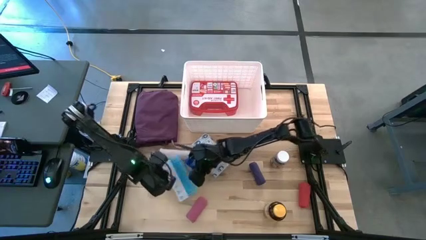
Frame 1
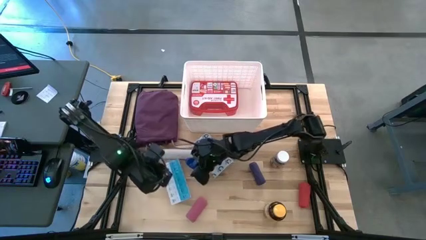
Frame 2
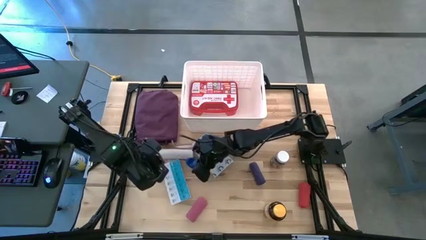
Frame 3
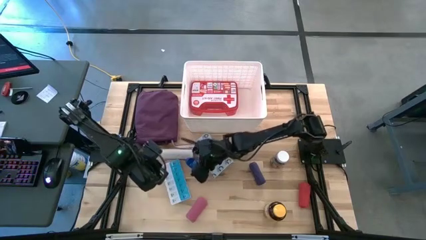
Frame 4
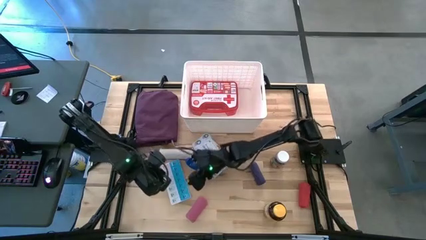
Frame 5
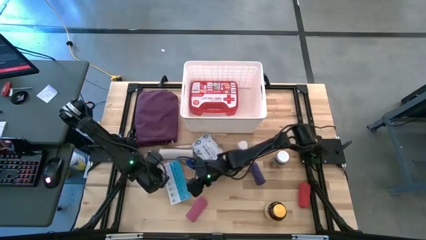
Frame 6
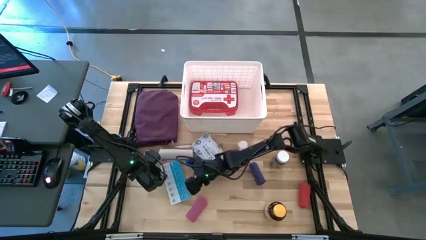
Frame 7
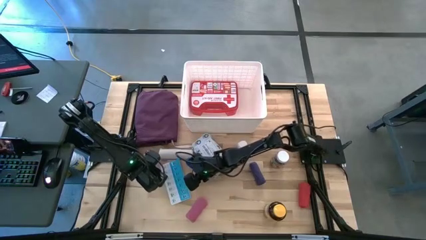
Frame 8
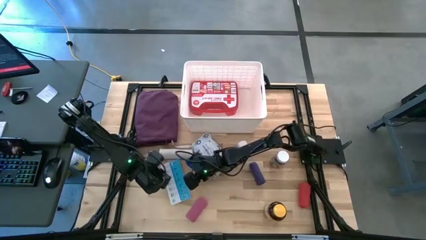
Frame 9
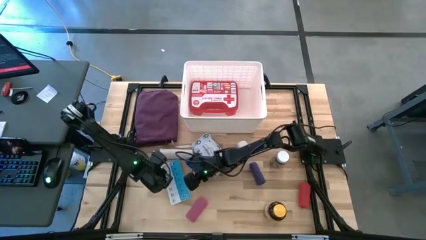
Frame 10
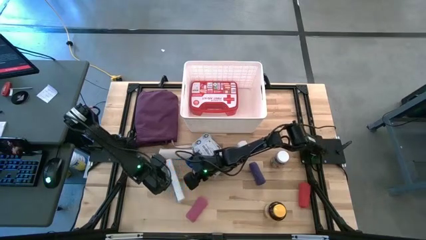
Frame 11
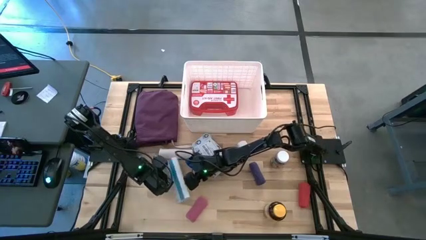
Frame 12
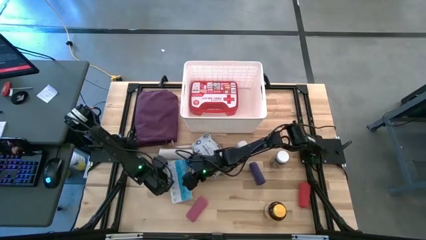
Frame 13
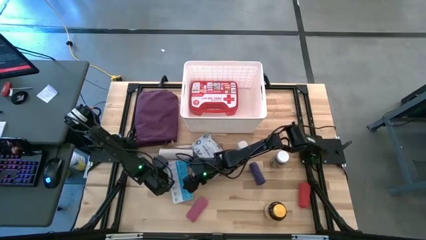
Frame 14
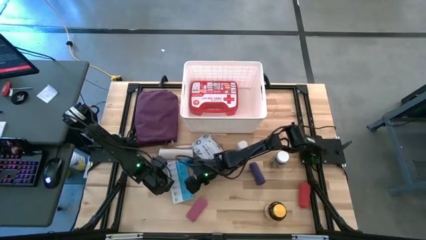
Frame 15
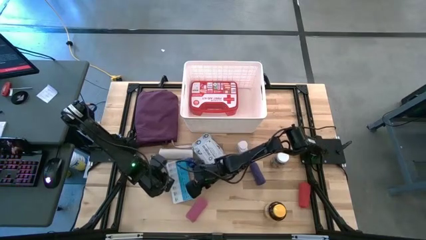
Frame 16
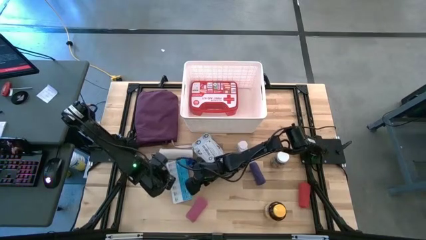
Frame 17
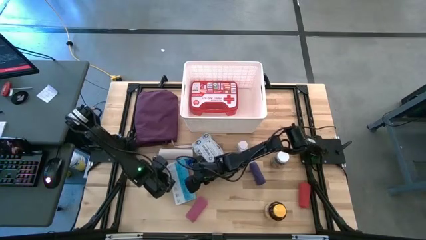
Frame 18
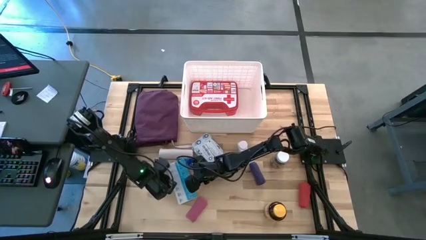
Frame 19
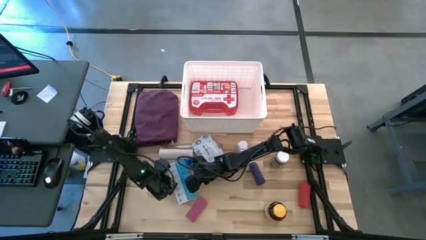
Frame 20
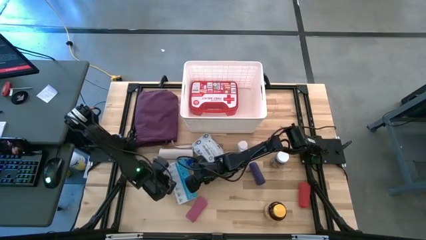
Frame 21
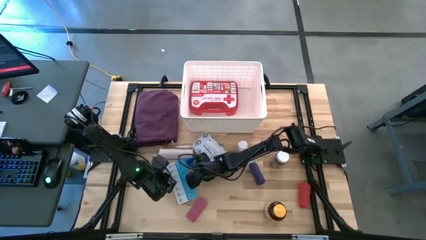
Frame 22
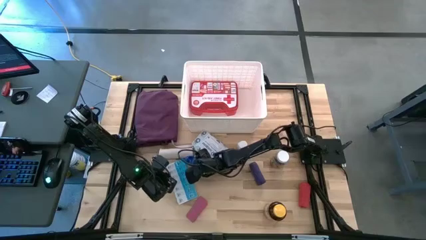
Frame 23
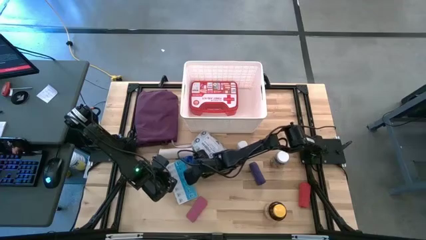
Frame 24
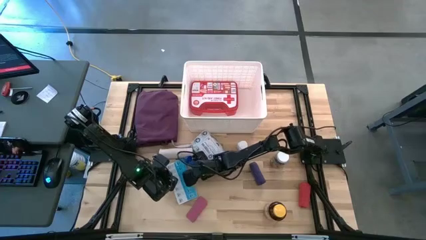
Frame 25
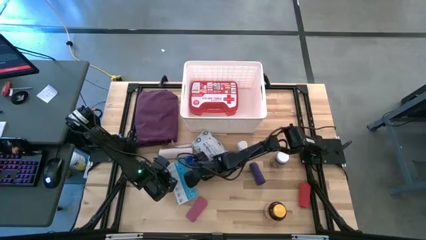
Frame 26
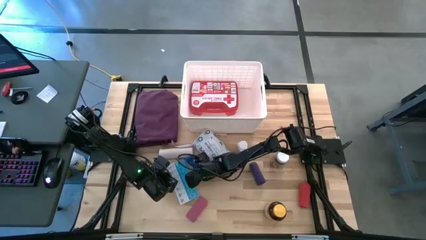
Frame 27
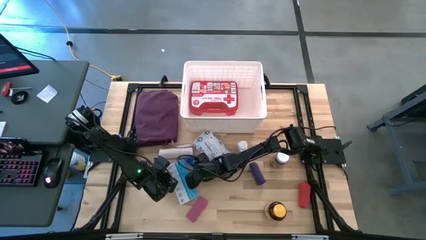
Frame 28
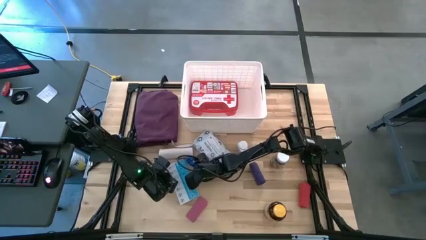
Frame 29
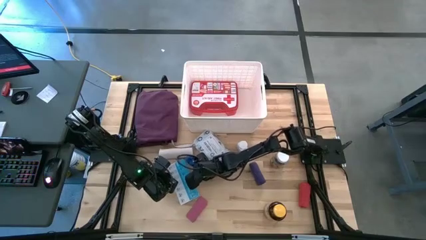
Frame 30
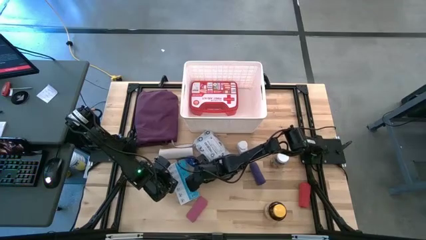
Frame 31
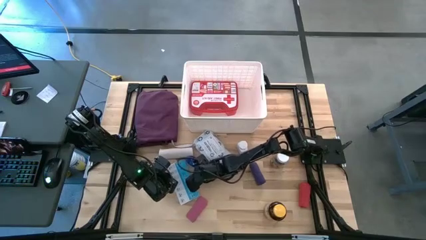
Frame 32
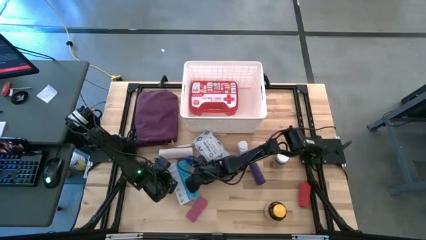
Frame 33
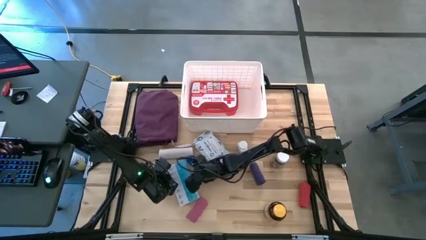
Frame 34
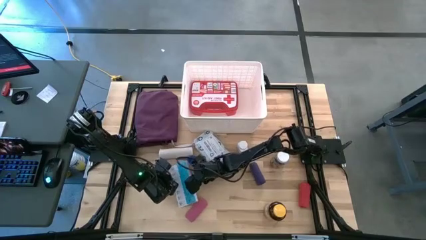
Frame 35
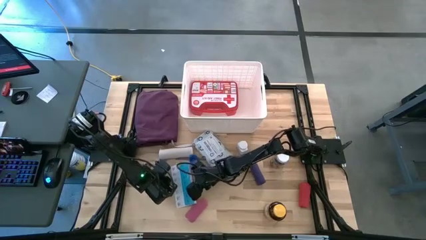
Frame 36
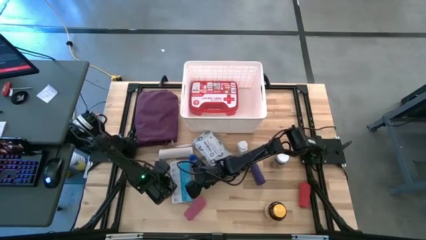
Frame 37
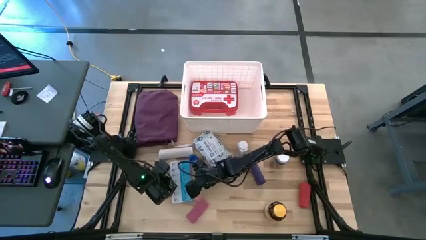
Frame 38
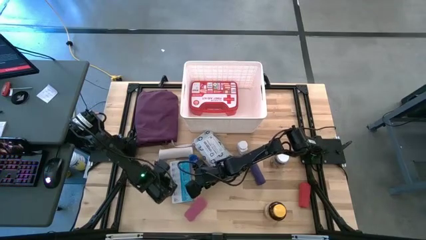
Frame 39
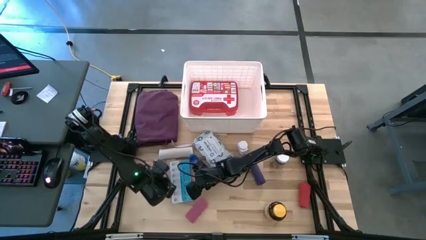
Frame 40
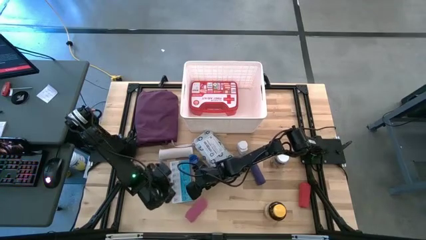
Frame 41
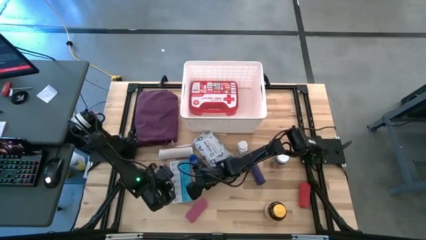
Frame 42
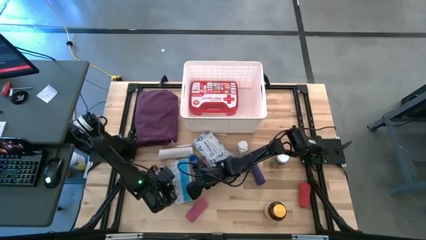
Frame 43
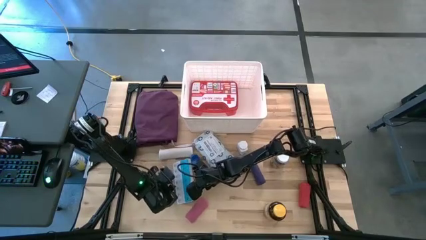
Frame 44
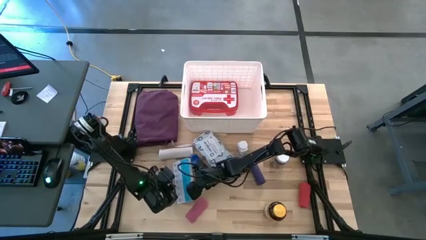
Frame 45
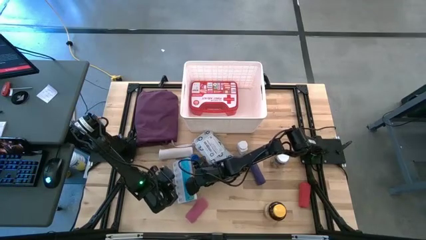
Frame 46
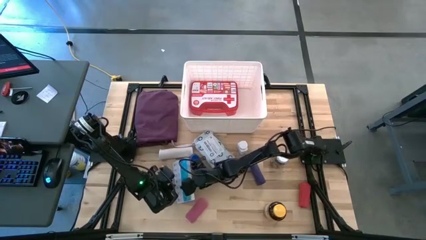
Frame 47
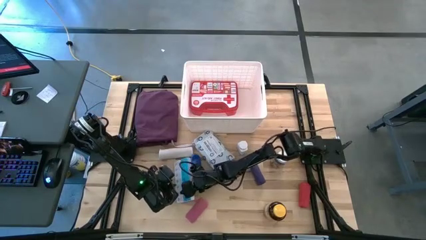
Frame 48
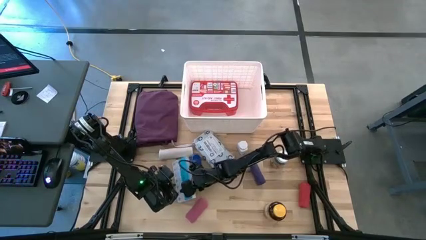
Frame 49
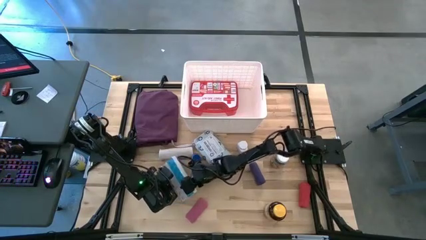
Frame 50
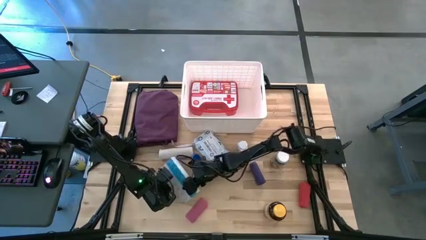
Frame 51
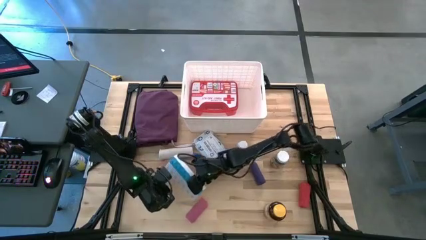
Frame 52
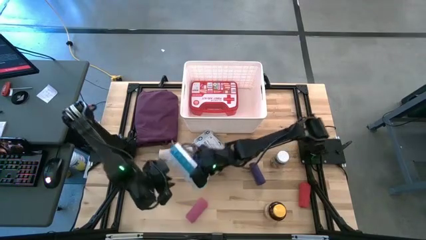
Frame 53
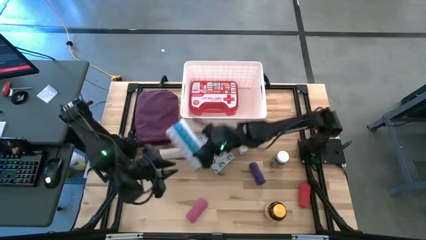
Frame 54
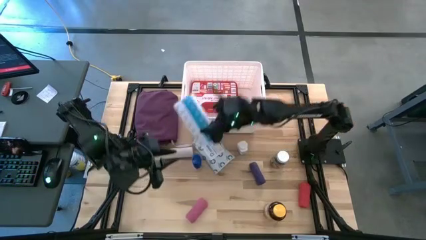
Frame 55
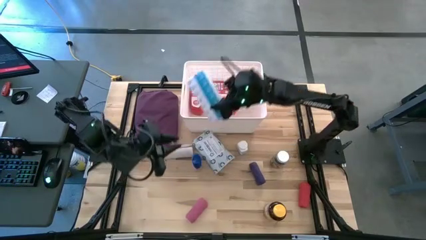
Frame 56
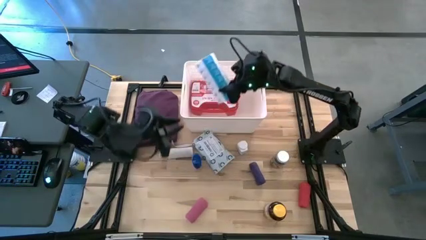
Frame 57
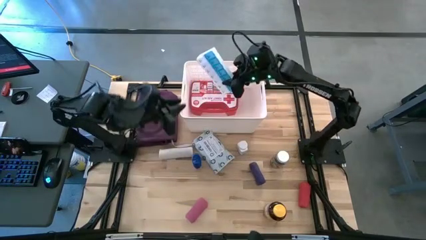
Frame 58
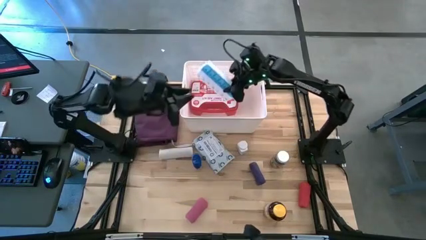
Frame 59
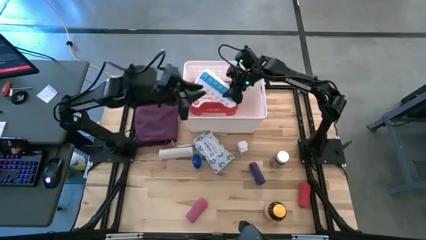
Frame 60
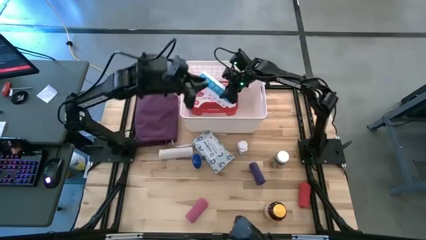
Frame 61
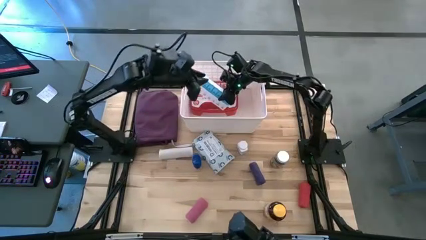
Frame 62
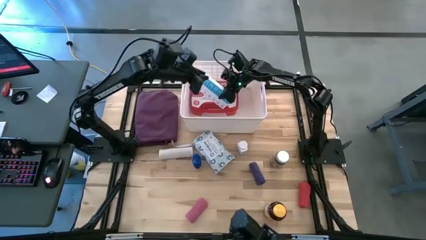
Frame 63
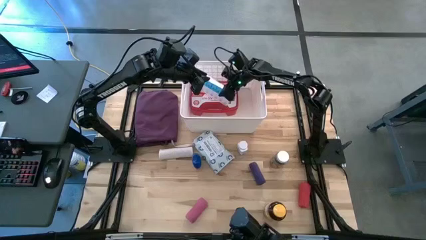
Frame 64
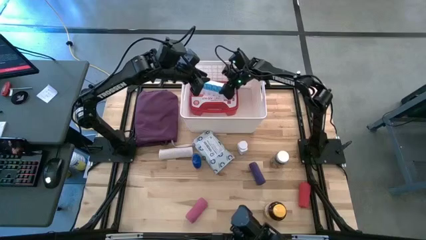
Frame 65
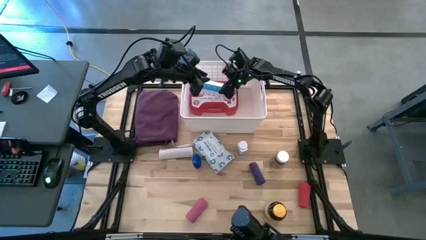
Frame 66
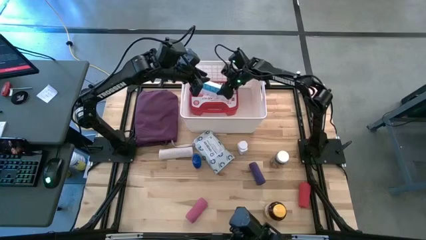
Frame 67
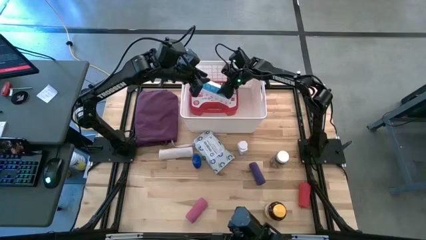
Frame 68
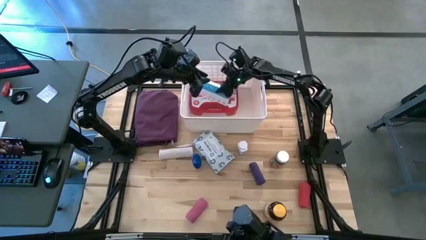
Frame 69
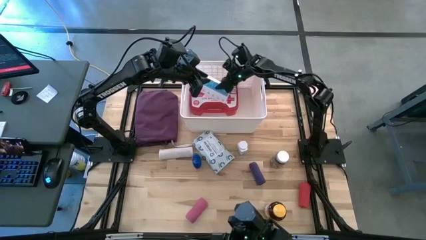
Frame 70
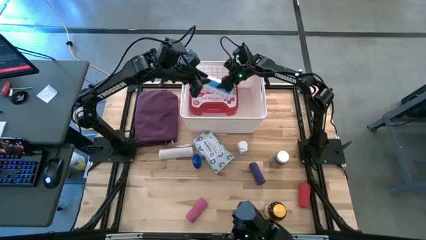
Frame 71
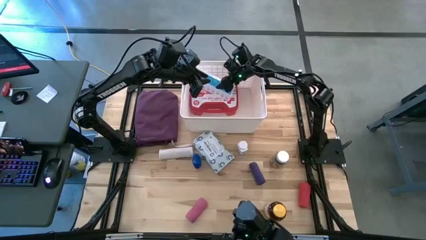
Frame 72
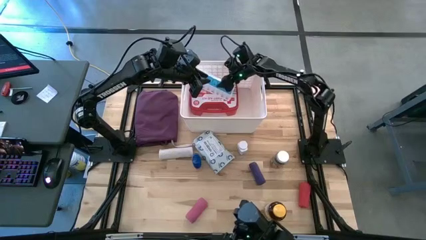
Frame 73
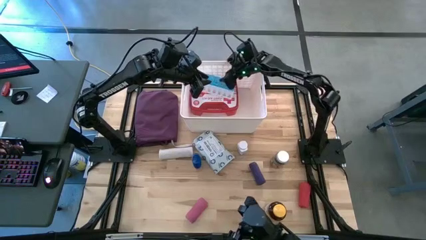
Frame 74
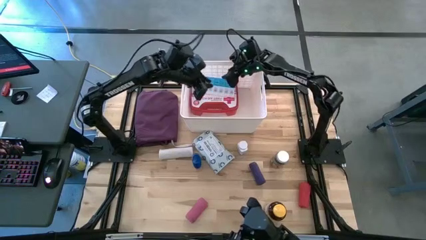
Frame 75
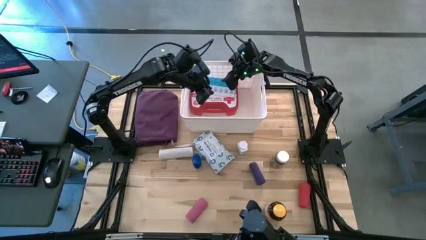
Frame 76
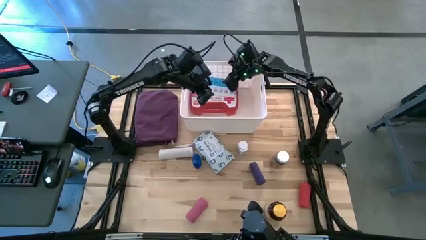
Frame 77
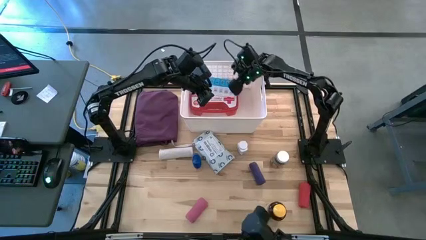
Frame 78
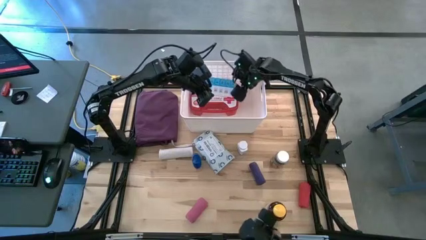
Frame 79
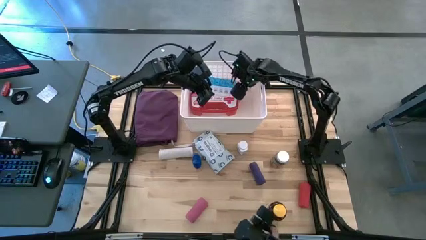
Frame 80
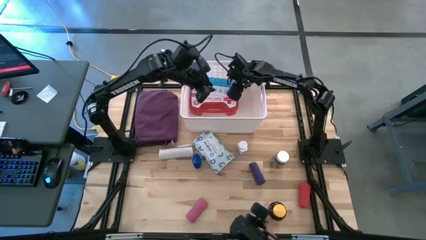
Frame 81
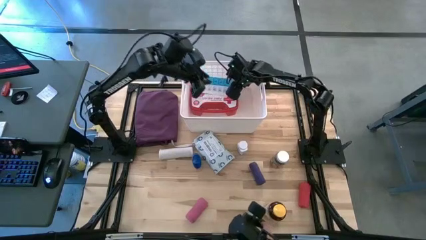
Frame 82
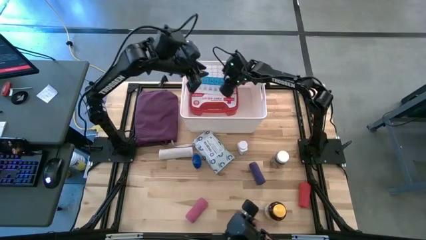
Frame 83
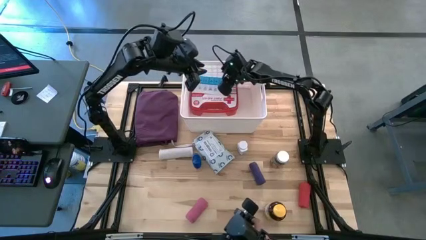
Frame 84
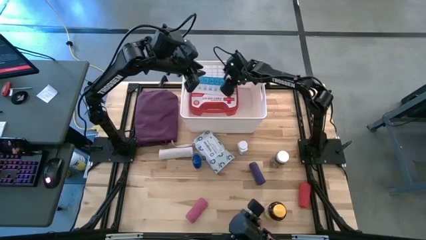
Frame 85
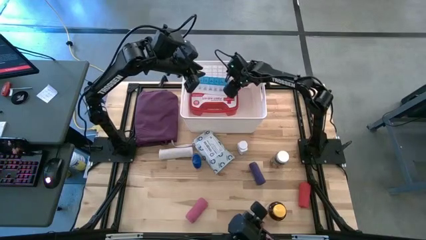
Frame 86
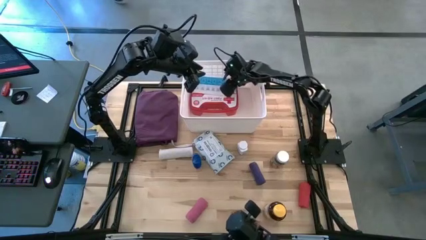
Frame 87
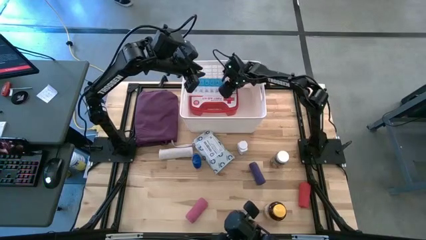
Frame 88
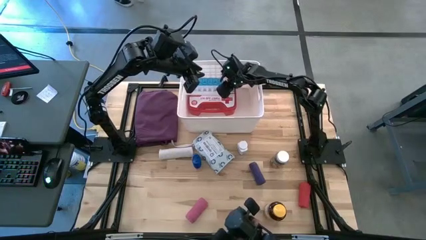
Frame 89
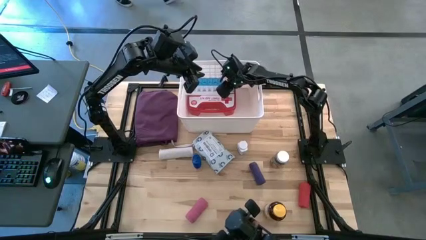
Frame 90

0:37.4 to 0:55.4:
Task: Pick & place medical supplies in basket/bin
Put the white and blue pill organizer into the white bin
